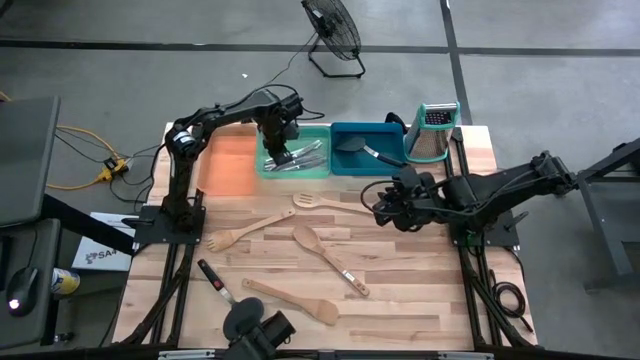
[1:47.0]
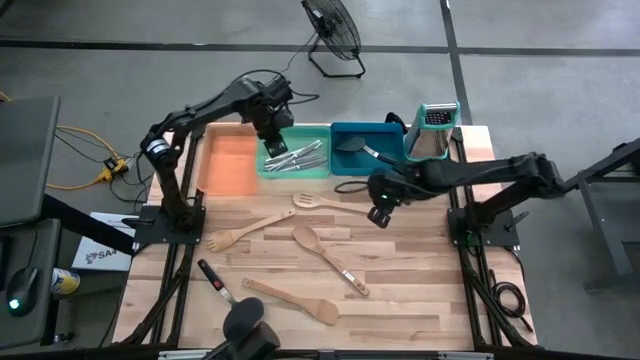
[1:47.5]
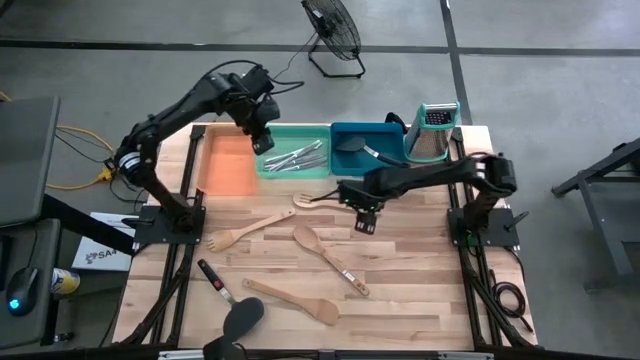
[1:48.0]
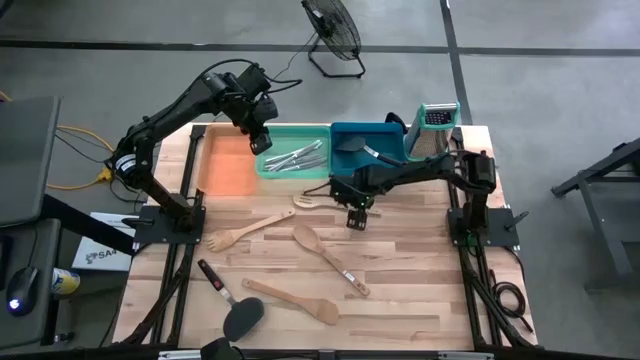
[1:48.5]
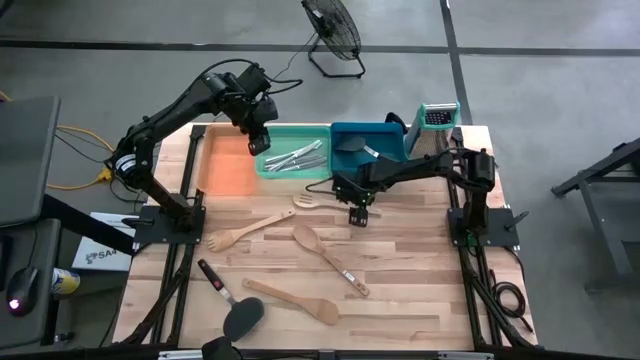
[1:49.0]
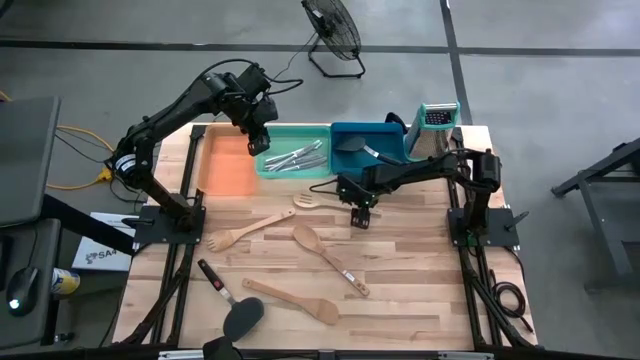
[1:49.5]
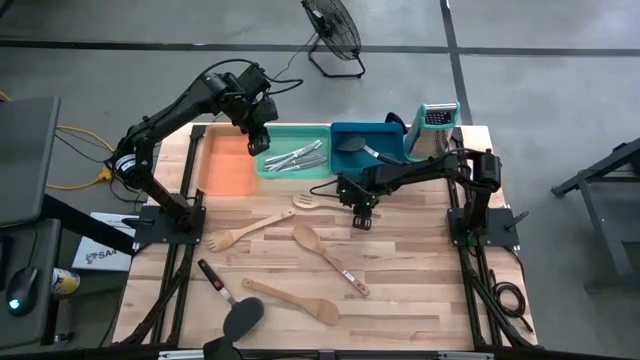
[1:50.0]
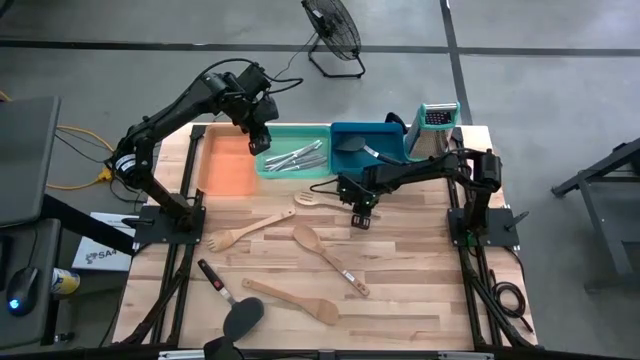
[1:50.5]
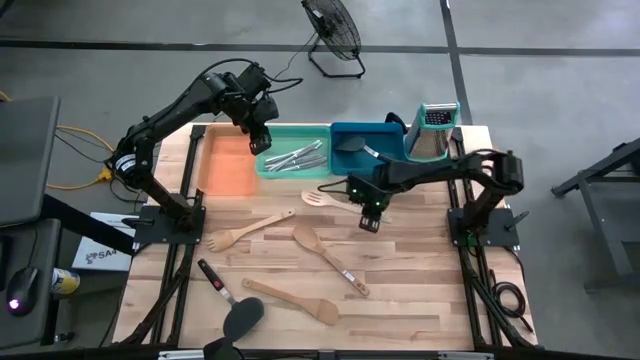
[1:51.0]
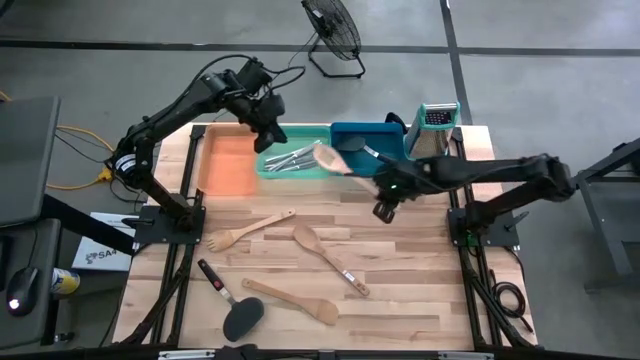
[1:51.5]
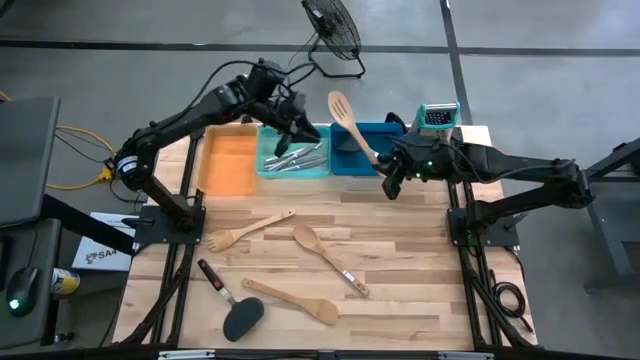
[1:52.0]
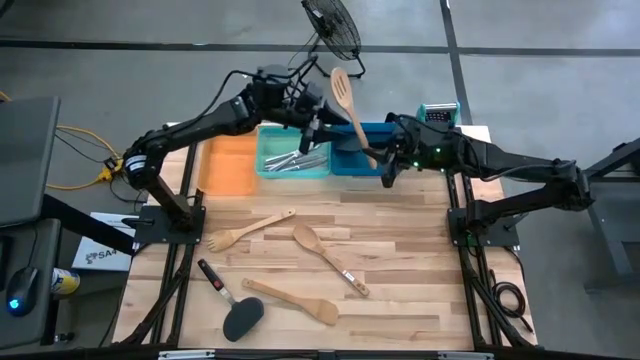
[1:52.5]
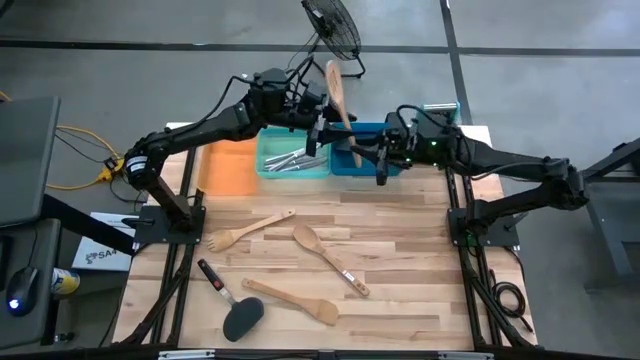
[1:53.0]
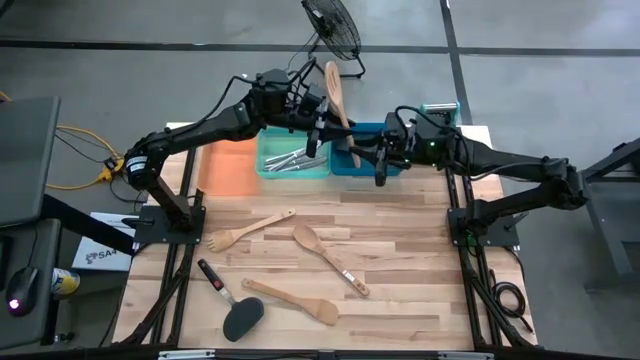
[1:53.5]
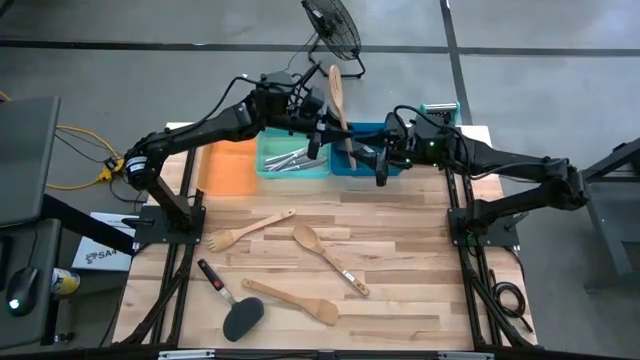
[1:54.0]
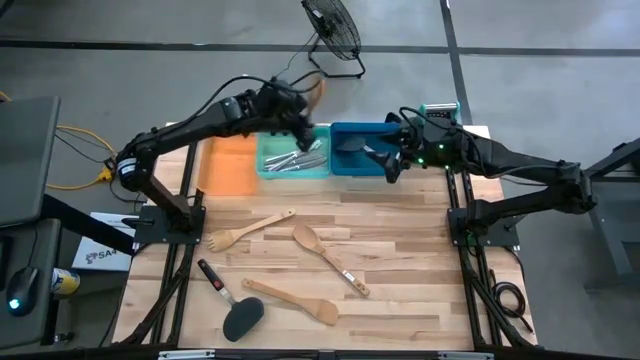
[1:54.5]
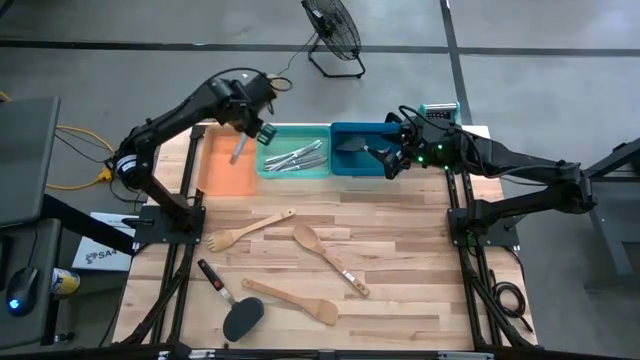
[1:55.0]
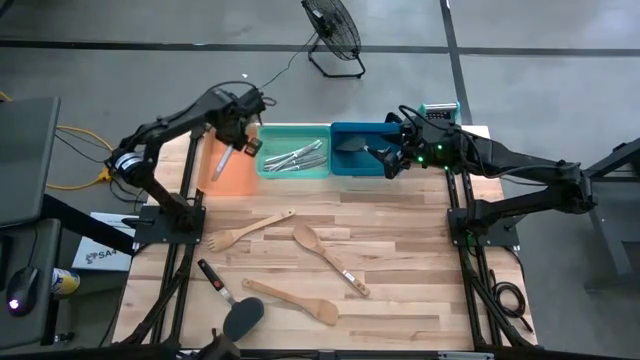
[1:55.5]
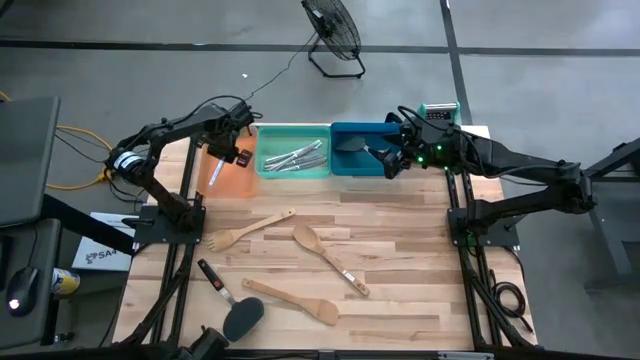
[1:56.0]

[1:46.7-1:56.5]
Task: Pick & Place Kitchen Items
Put the brown serving spoon into the orange bin

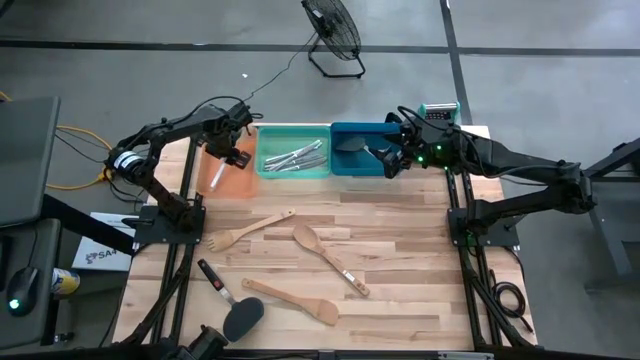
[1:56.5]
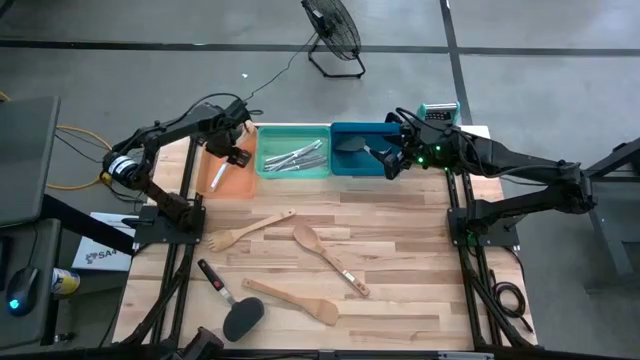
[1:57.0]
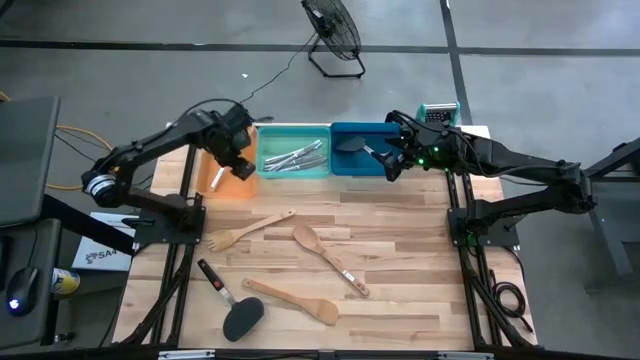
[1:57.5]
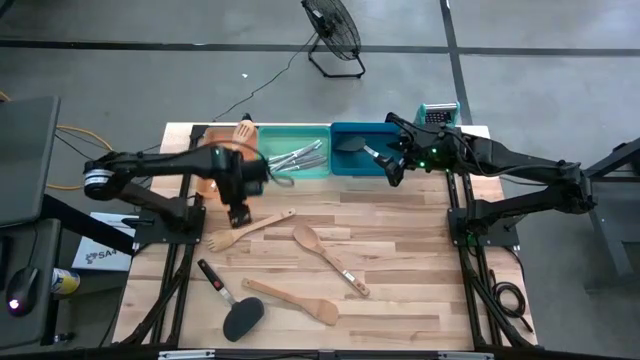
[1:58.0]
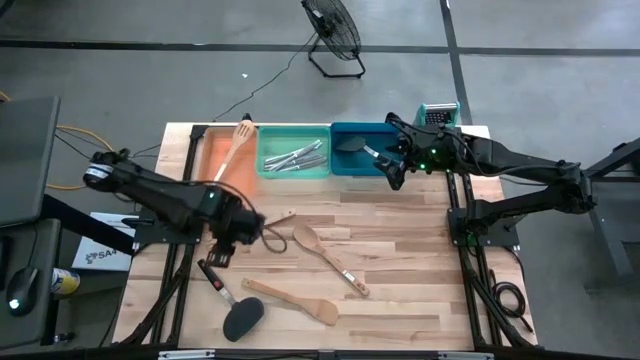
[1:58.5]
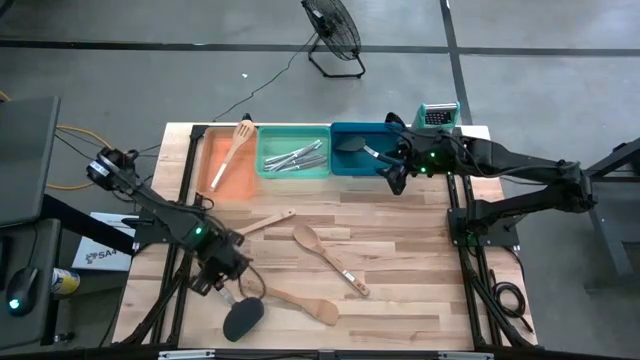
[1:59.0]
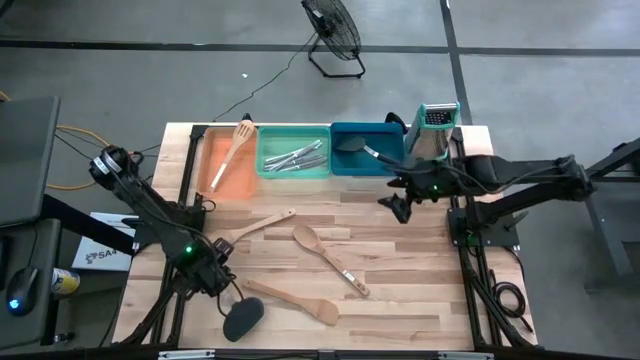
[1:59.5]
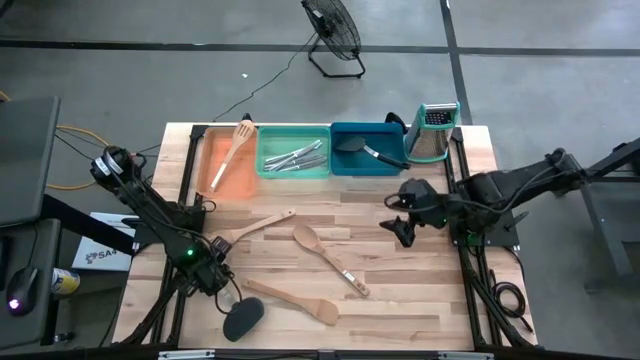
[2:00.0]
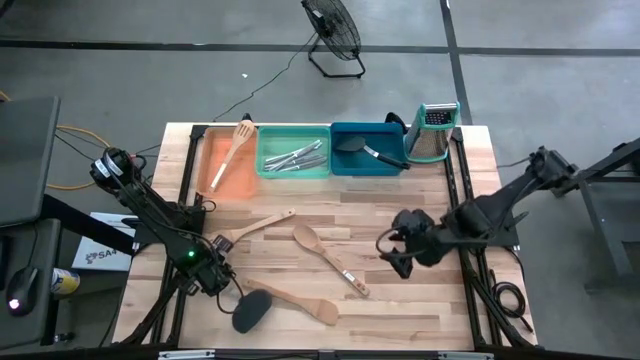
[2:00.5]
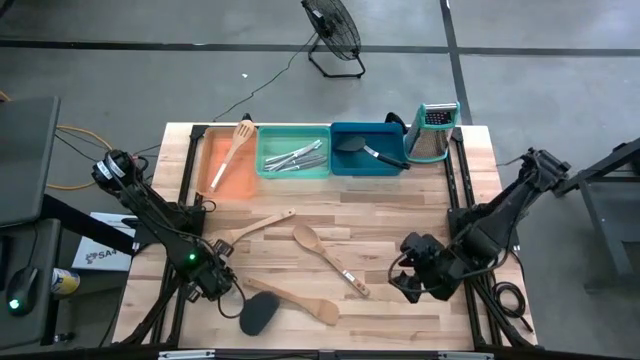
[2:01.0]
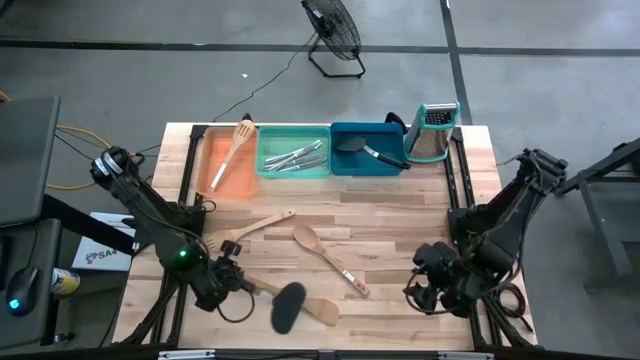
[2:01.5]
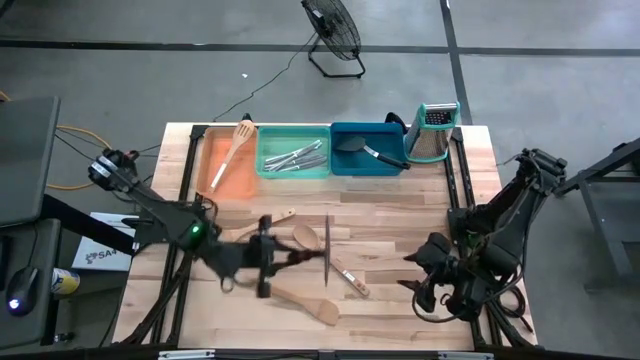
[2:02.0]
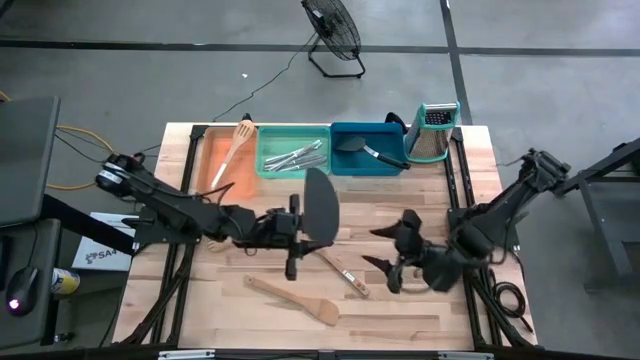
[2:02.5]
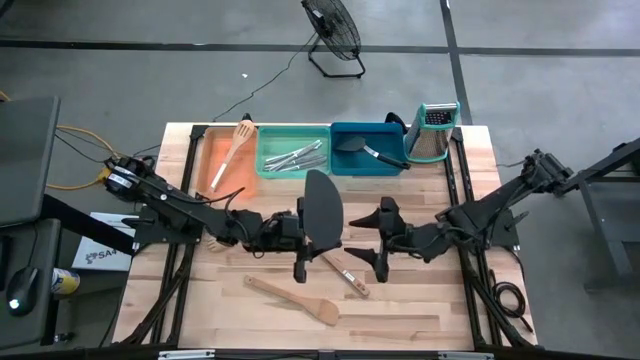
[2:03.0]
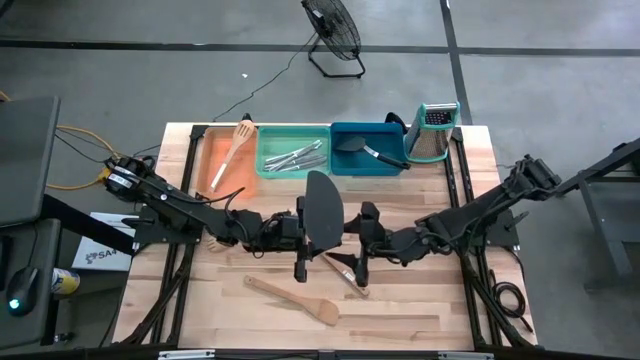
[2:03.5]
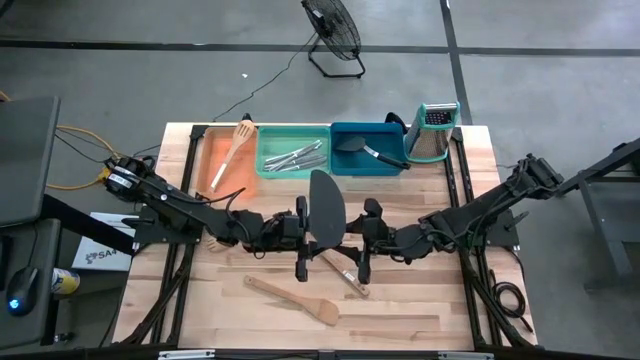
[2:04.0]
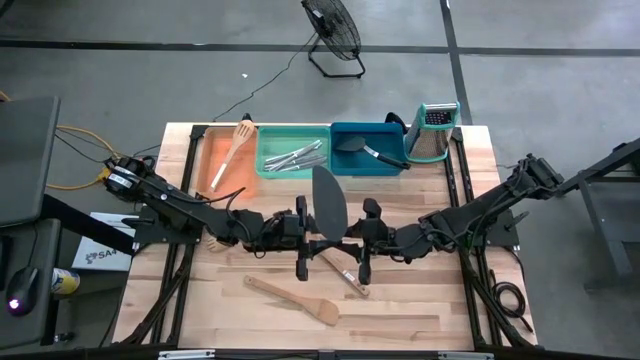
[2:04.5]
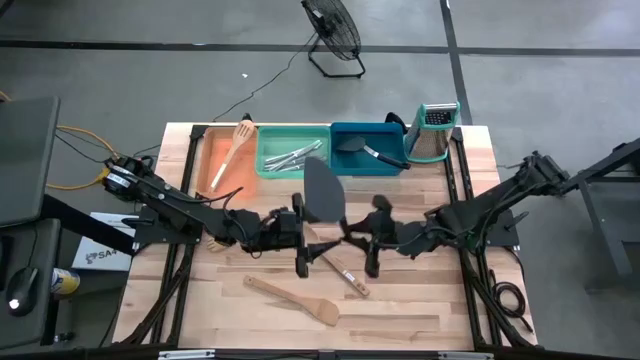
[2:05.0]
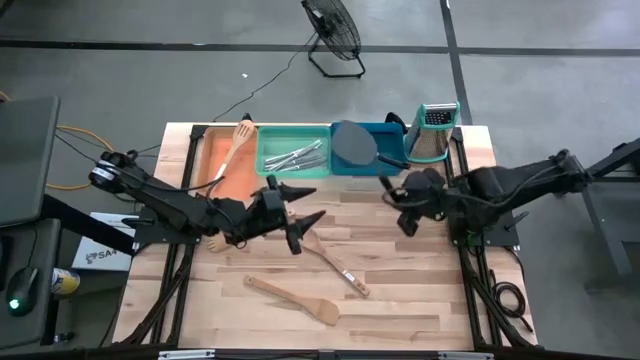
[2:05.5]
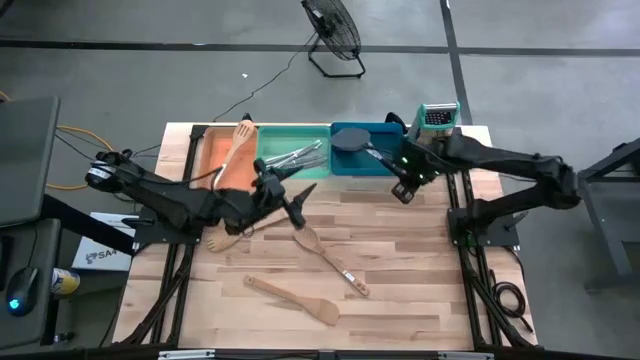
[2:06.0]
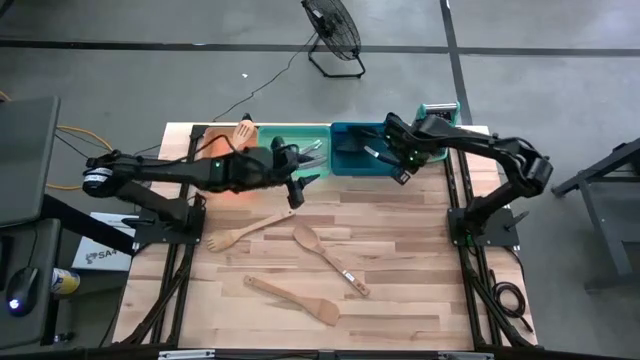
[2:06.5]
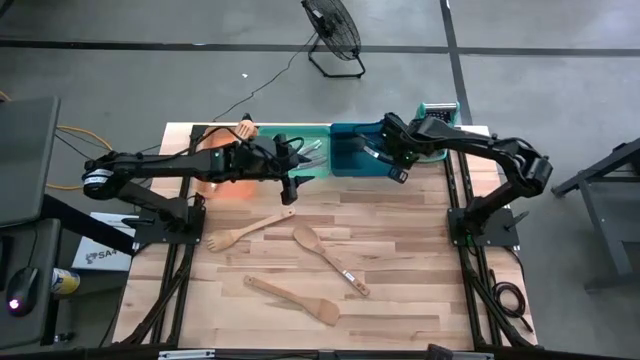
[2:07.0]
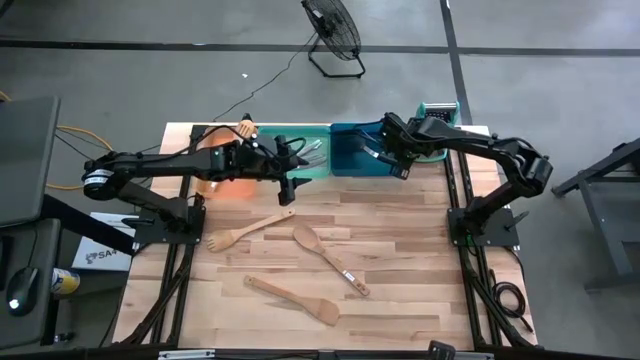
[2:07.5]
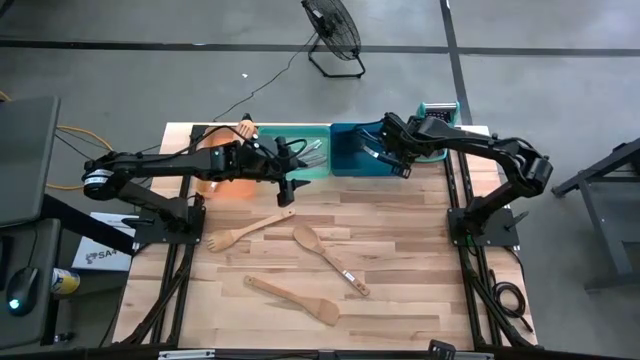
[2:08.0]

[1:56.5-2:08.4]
Put the black spatula into the blue bin
